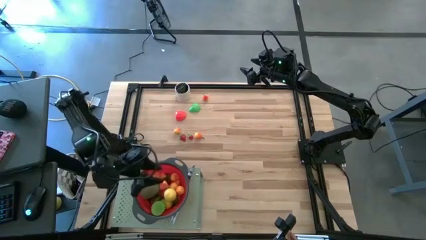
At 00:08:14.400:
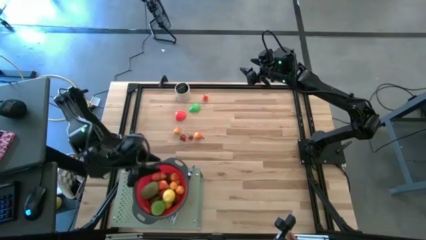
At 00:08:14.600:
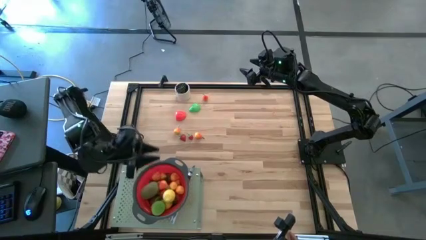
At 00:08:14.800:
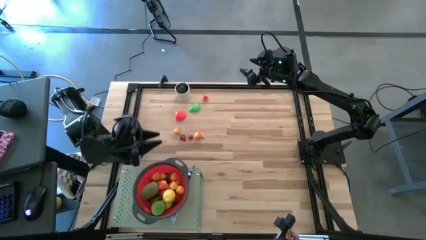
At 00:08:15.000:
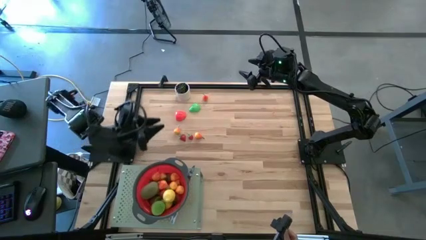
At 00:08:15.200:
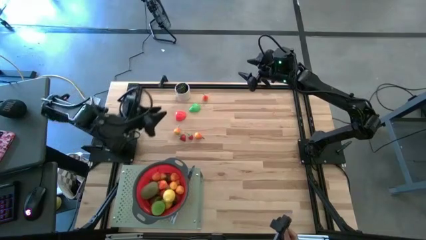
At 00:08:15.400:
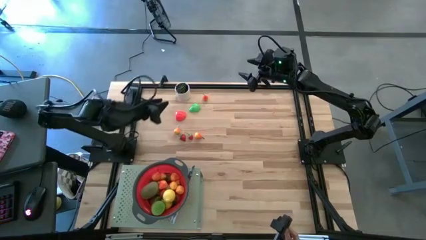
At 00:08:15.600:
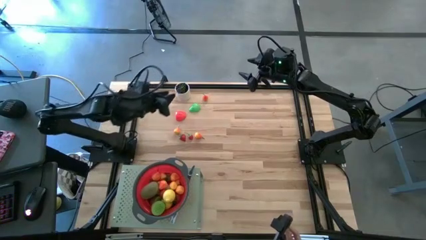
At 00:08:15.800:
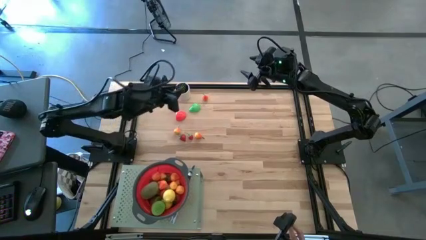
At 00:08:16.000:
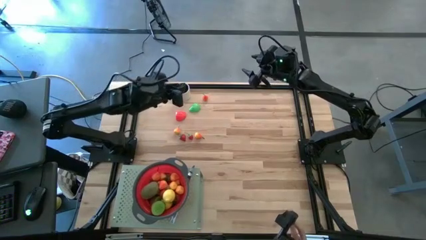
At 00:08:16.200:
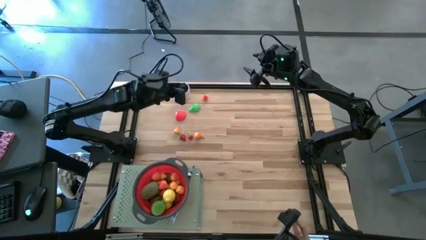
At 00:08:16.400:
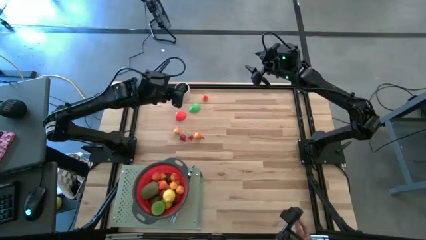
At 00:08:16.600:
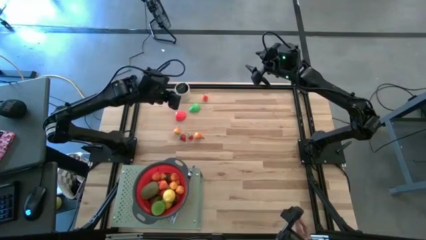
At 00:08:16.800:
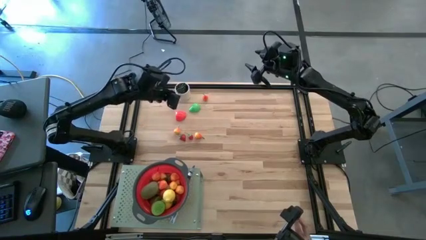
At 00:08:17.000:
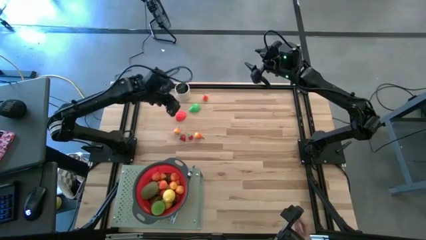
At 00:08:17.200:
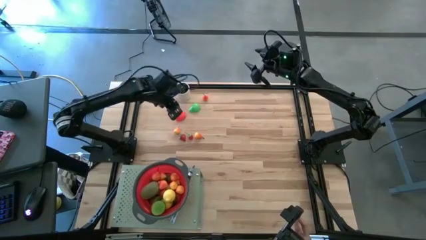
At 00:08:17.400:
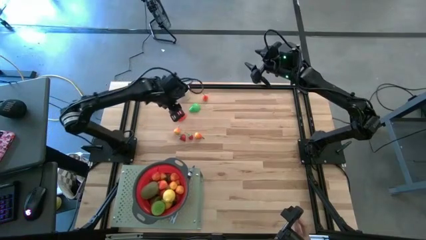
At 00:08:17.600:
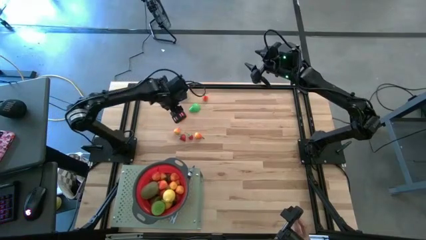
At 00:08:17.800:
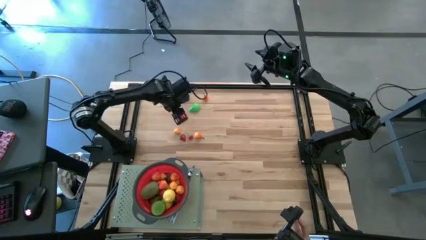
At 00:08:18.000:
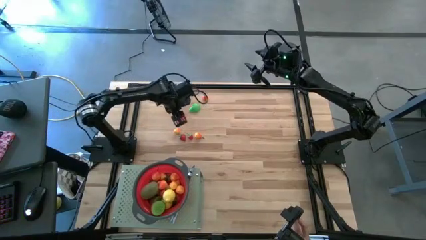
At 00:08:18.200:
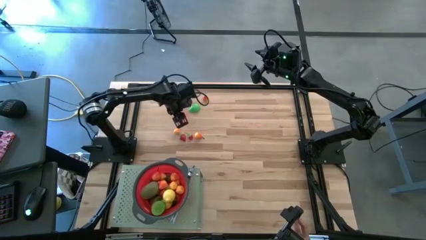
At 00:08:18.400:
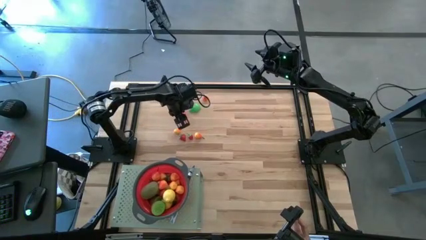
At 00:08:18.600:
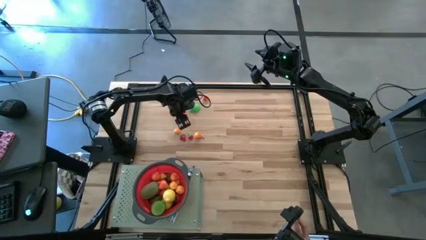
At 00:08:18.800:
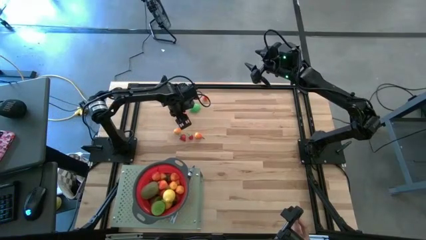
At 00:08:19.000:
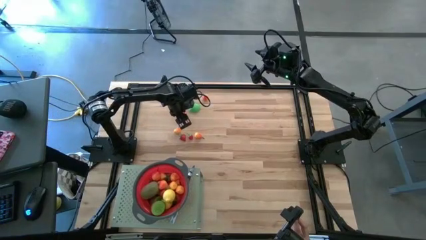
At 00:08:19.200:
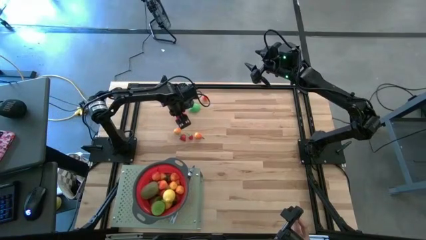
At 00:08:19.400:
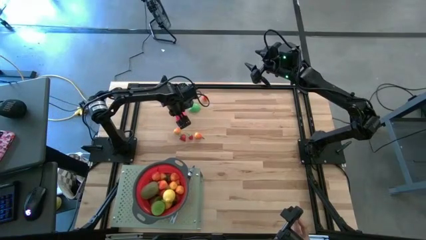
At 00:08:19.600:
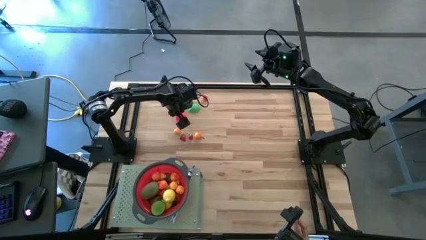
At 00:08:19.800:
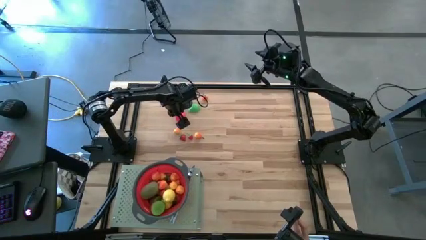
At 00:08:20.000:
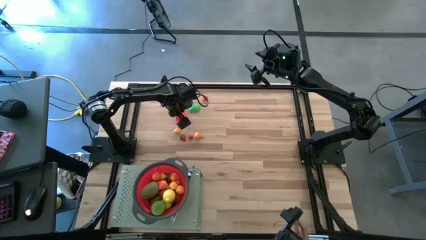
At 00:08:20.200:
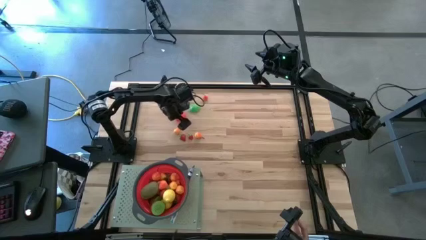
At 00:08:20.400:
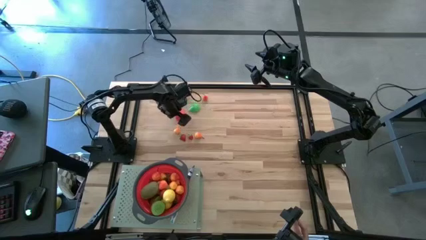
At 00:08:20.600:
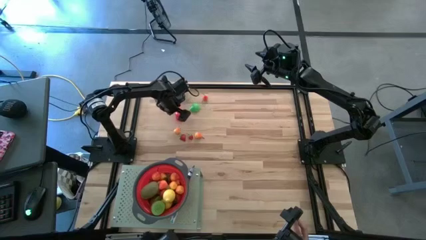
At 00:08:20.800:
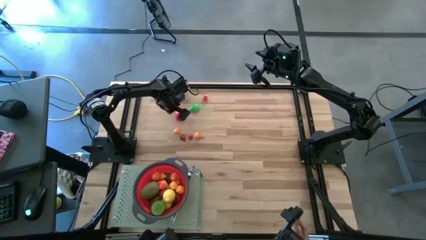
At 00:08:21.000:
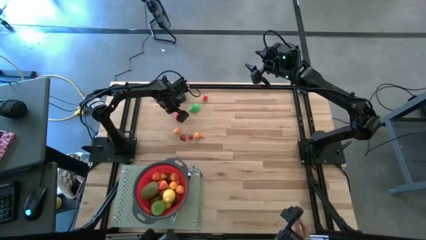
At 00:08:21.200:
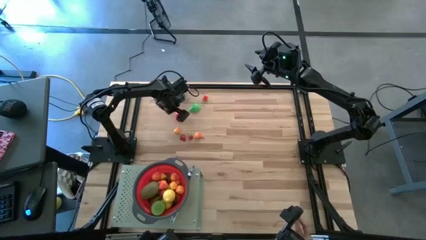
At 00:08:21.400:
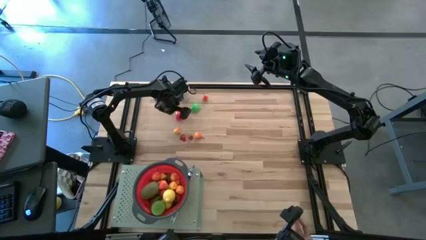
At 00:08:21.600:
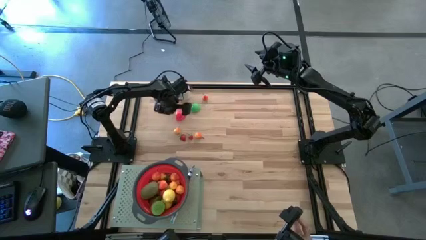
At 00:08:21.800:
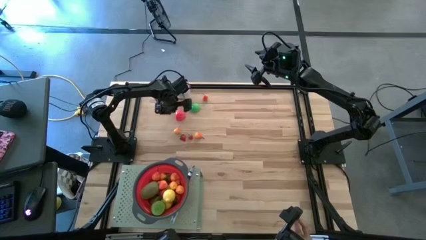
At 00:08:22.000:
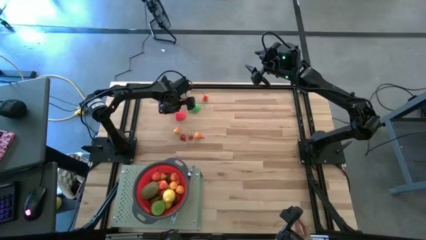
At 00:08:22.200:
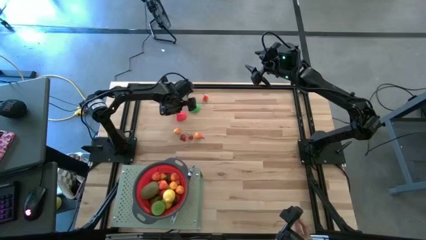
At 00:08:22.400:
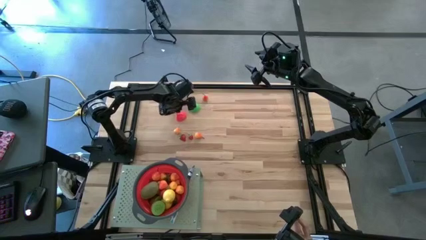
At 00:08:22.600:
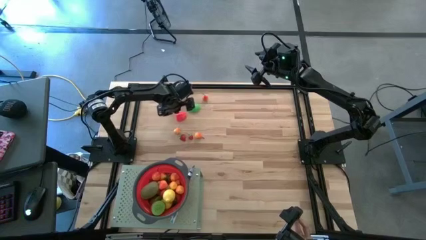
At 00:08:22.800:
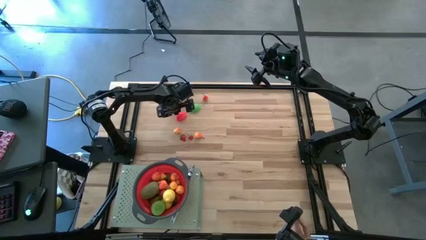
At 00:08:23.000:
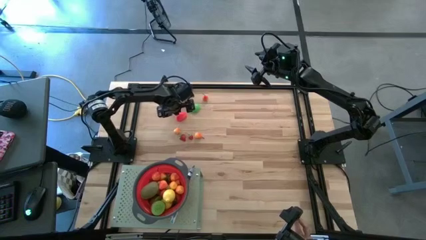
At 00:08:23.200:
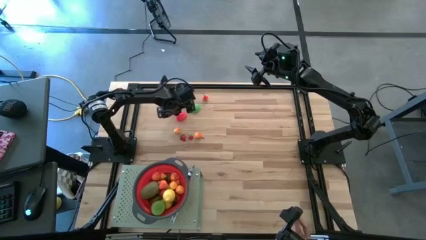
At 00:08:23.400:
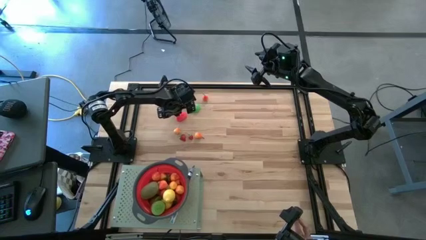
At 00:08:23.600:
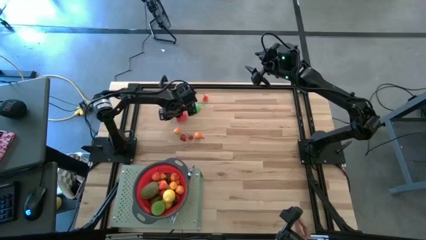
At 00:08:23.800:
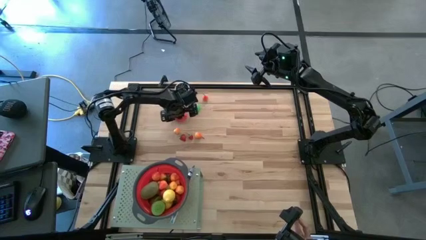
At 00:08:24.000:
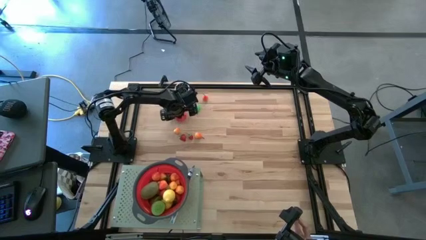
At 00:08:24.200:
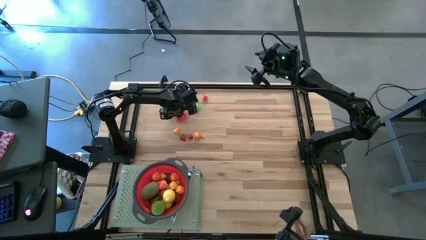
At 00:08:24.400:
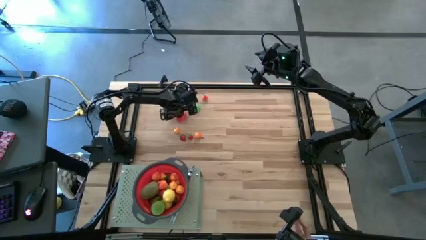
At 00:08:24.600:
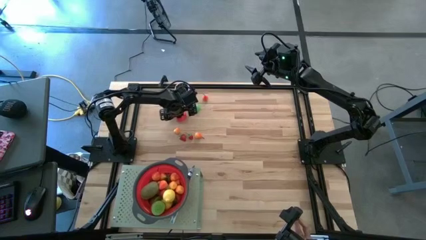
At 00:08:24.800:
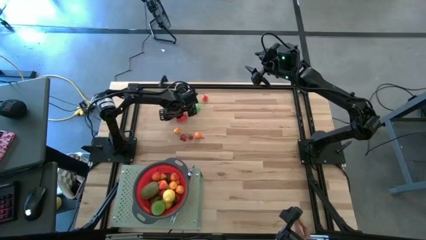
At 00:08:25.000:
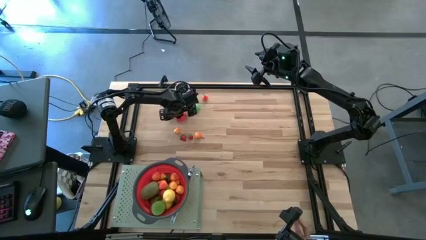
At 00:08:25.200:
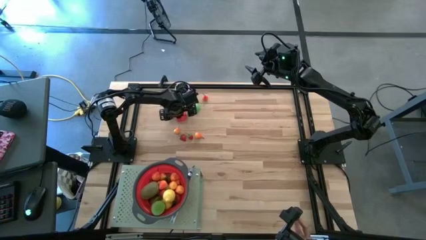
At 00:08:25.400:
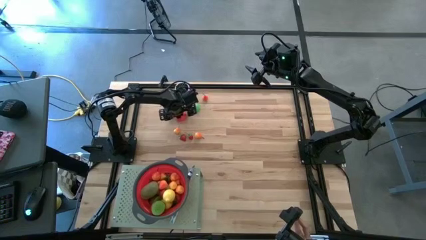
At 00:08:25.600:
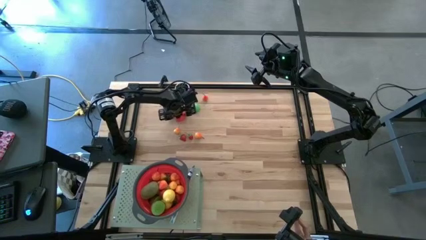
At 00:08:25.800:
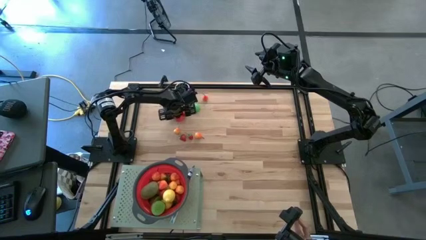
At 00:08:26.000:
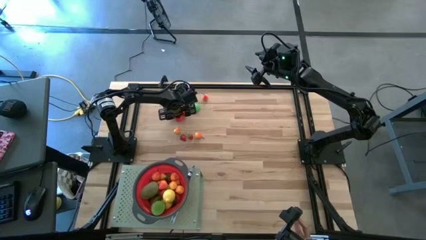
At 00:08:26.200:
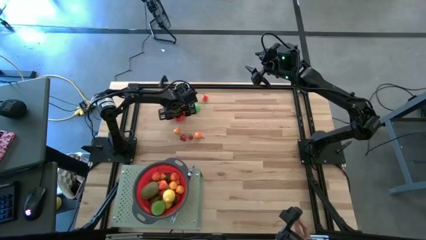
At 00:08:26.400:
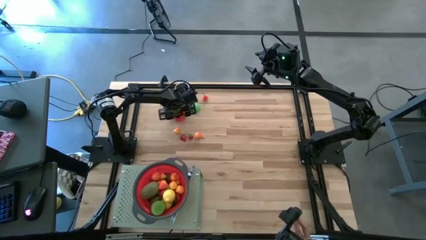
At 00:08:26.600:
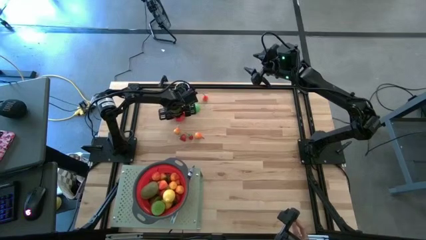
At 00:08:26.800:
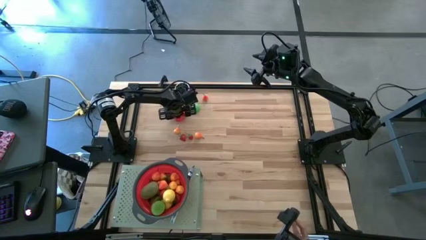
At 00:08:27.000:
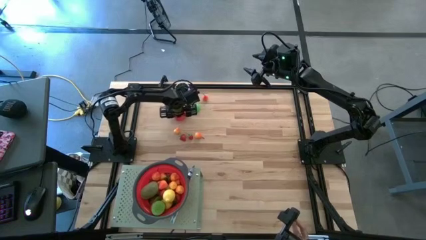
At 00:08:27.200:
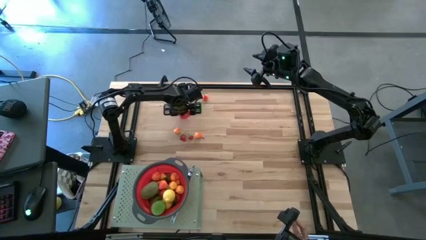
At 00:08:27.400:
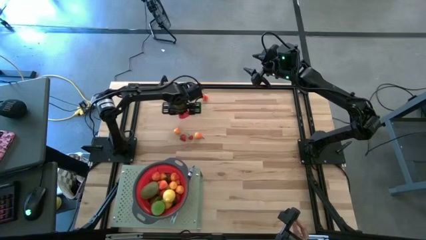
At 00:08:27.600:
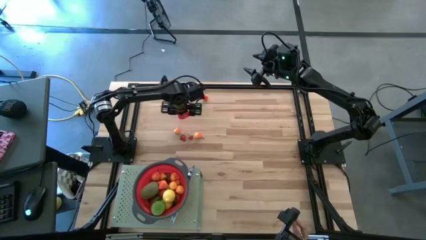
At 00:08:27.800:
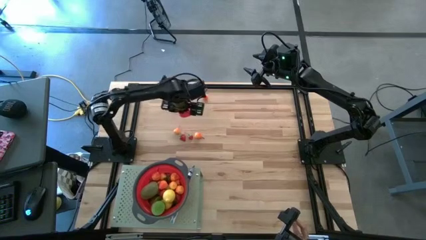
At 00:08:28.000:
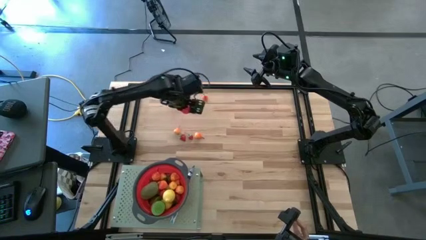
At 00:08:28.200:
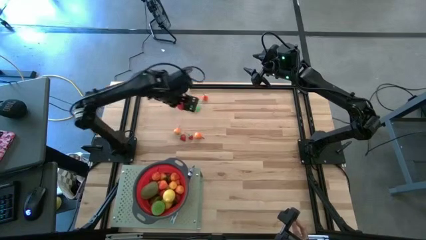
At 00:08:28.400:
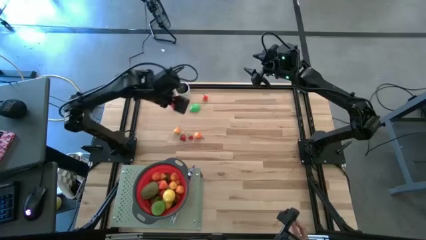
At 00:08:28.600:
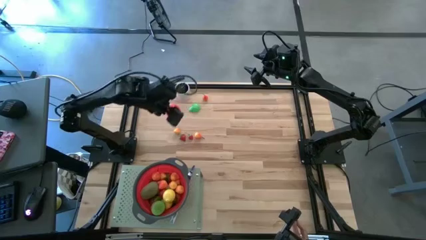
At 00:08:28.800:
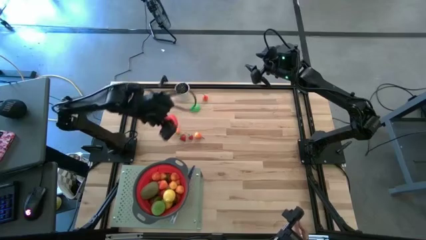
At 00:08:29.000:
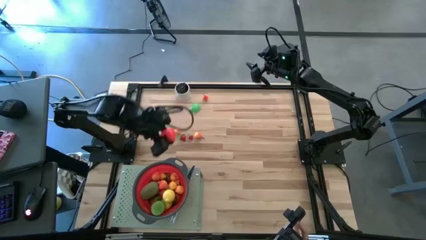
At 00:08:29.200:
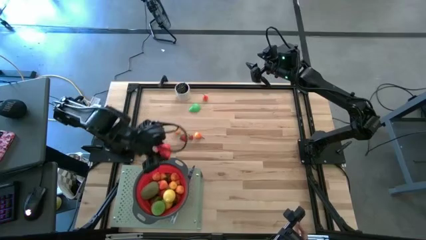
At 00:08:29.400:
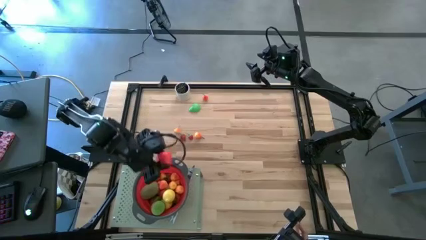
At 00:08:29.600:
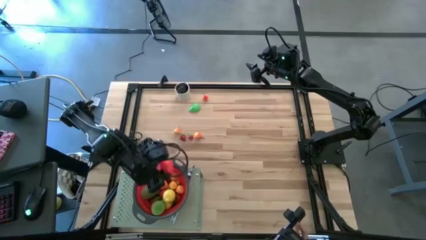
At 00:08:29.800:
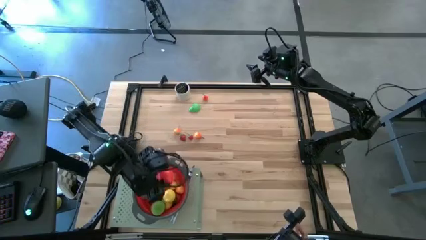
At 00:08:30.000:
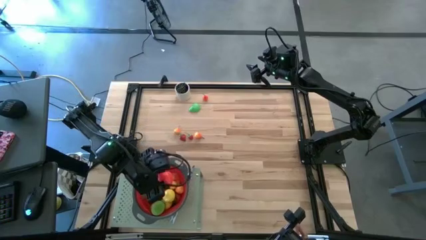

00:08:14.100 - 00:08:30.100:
Task: Pick & Place Fruit
Put the half apple into the red strainer bowl on the shelf

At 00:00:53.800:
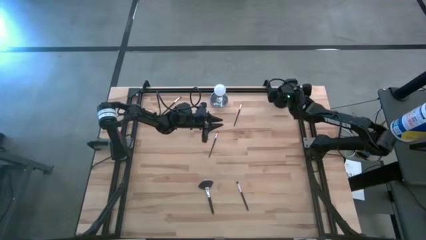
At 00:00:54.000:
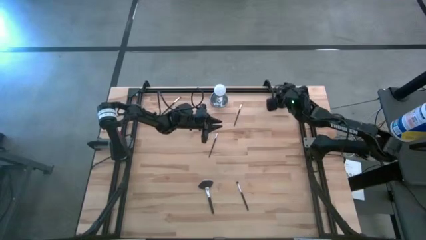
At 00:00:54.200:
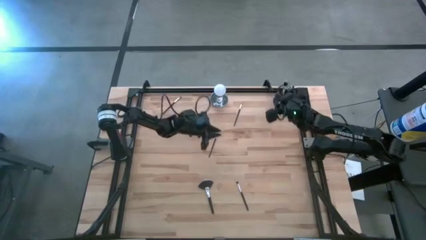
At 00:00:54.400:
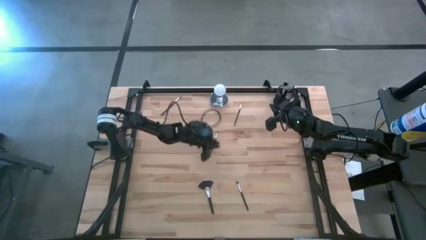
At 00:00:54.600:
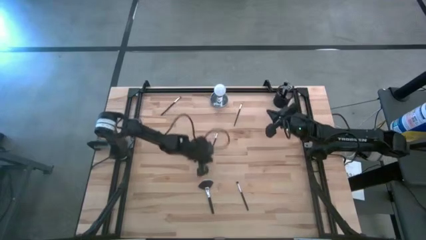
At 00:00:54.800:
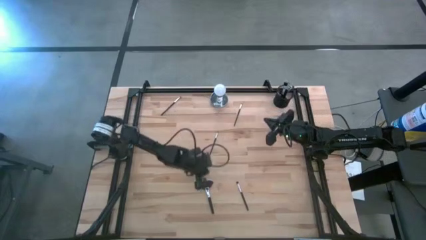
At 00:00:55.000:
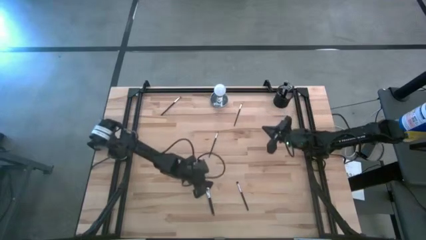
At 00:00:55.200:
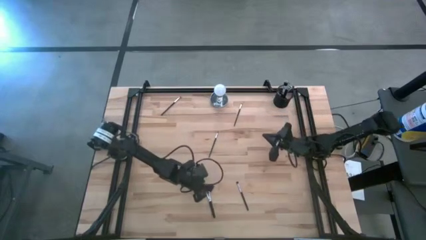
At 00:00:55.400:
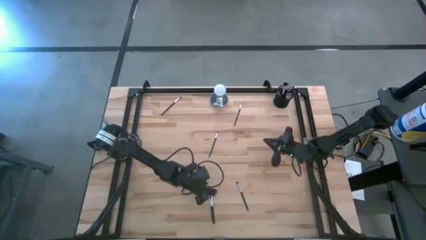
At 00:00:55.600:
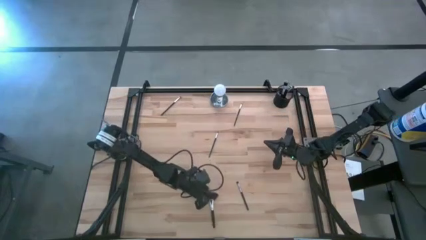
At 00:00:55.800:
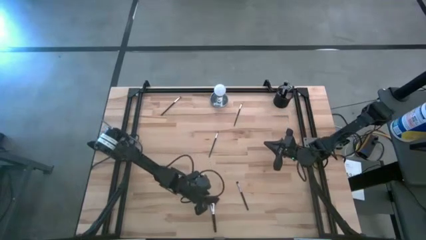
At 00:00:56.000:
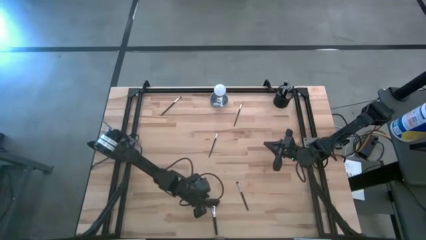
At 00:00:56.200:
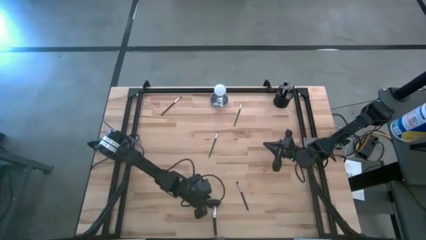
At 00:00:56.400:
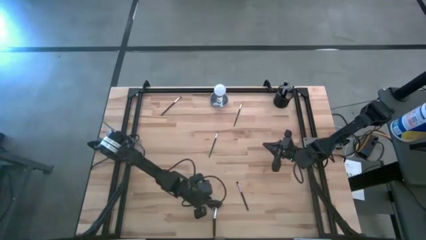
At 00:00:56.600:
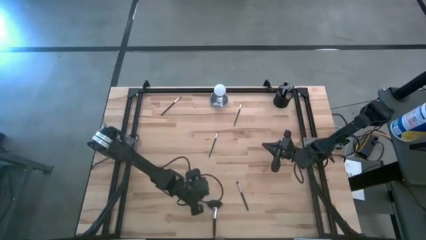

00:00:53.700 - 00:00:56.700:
Task: Pick & Place Makeup Supplies
Put the makeup brush into the makeup holder
